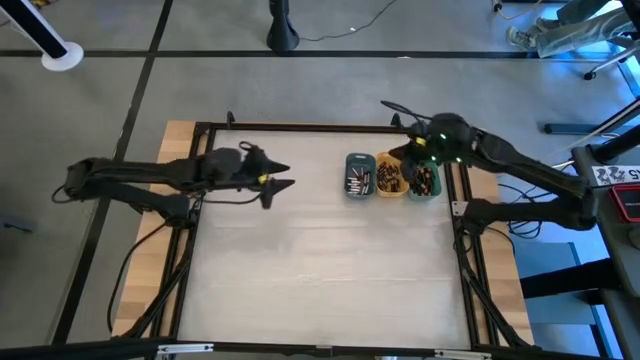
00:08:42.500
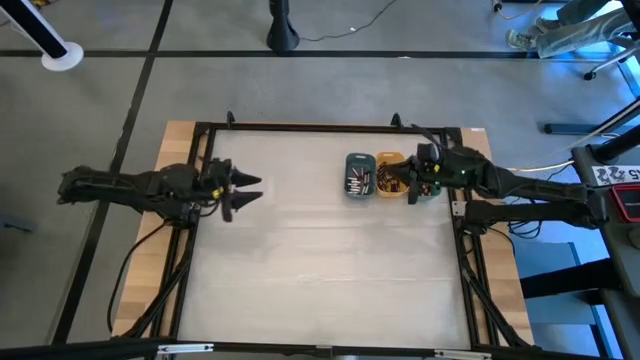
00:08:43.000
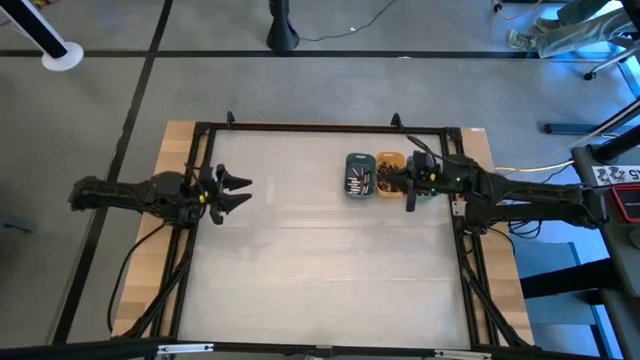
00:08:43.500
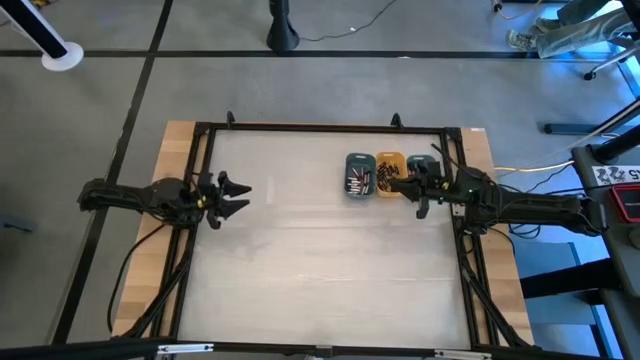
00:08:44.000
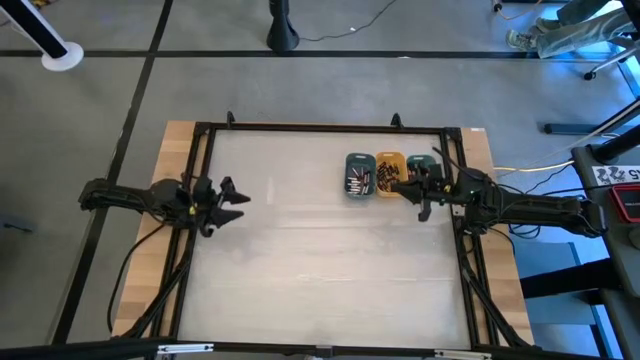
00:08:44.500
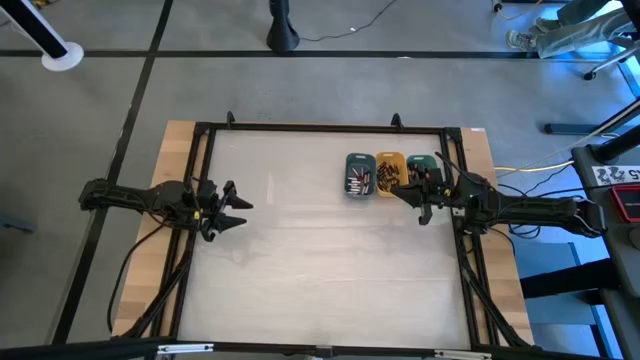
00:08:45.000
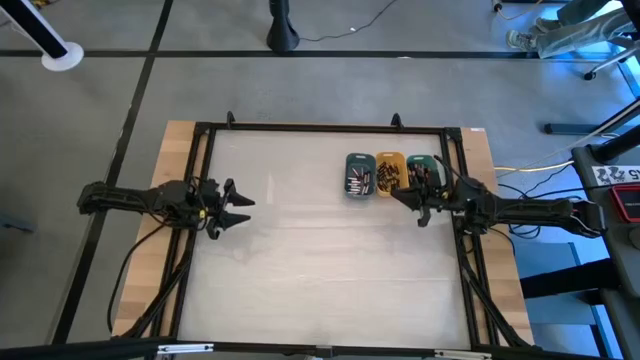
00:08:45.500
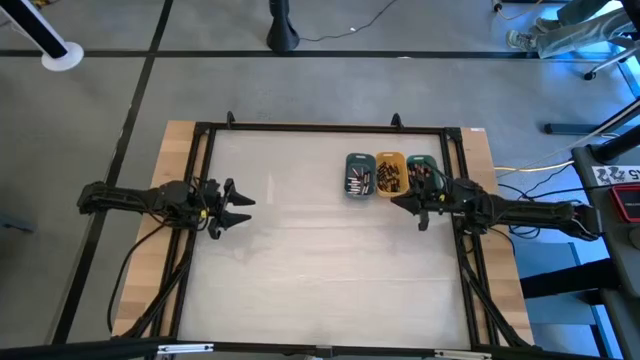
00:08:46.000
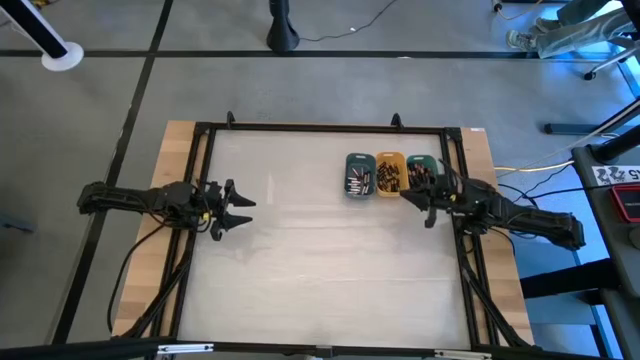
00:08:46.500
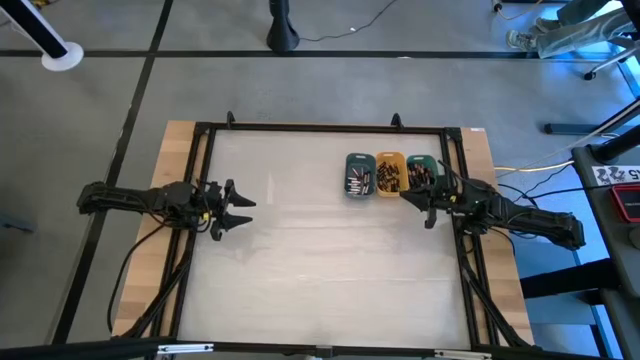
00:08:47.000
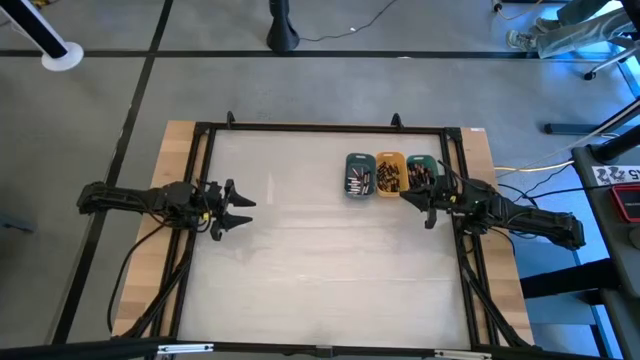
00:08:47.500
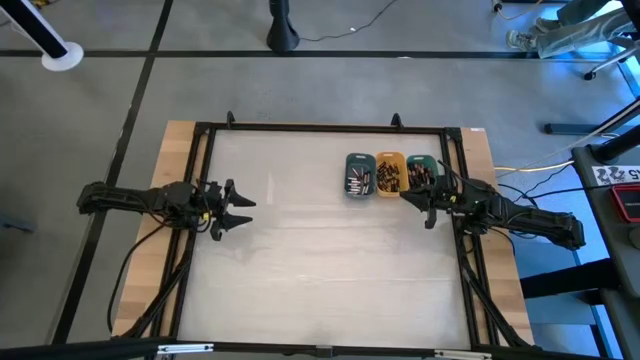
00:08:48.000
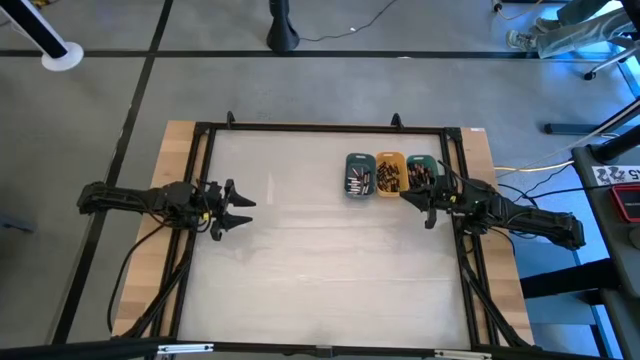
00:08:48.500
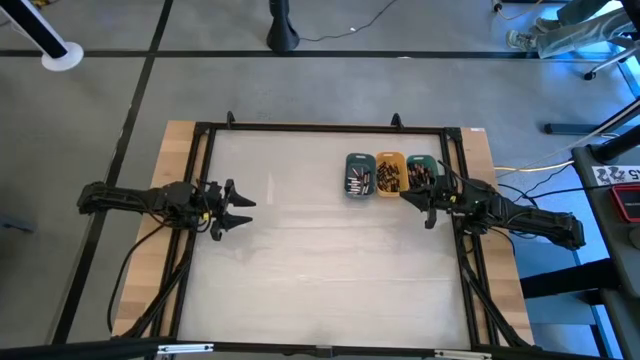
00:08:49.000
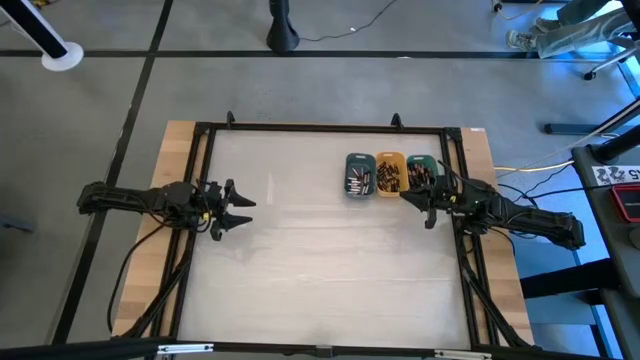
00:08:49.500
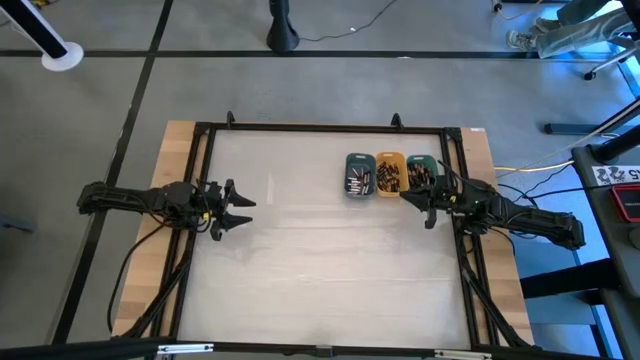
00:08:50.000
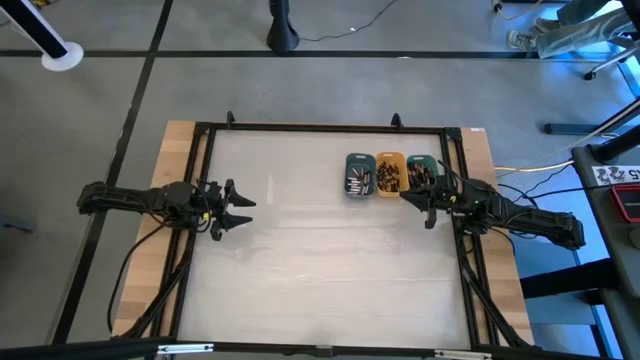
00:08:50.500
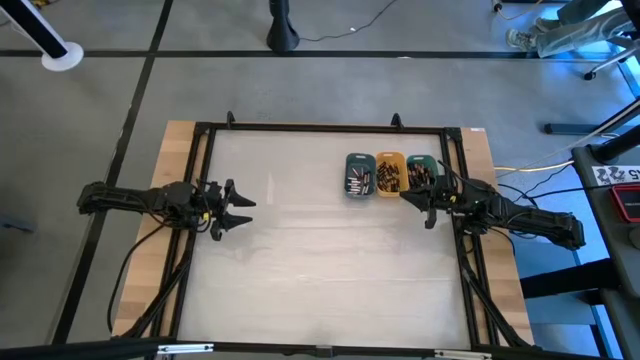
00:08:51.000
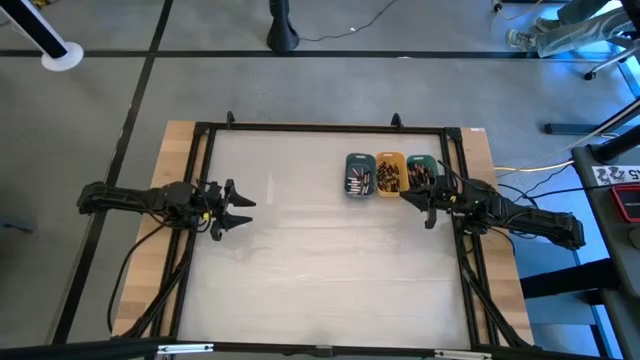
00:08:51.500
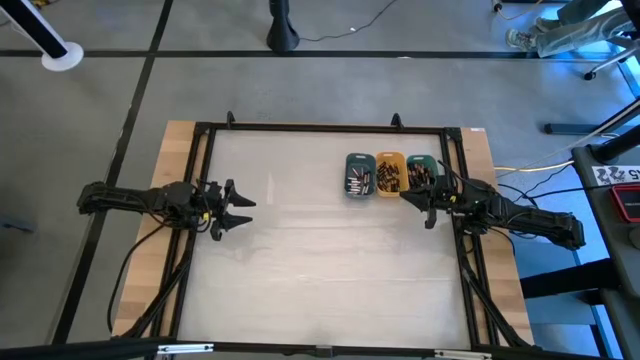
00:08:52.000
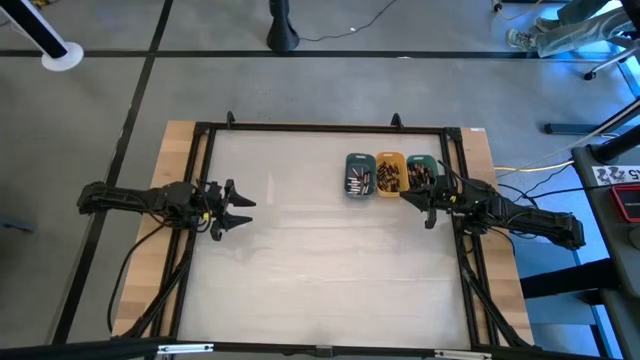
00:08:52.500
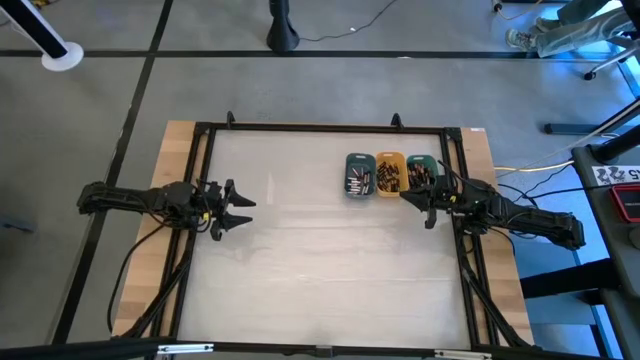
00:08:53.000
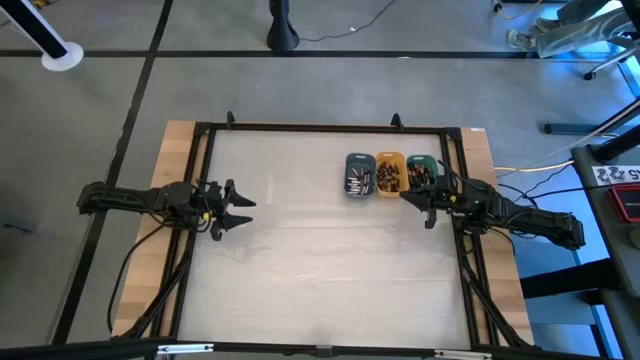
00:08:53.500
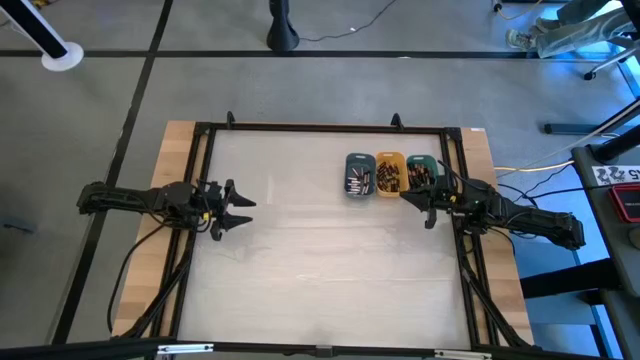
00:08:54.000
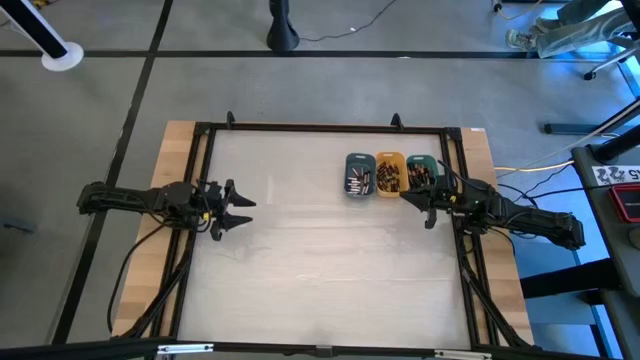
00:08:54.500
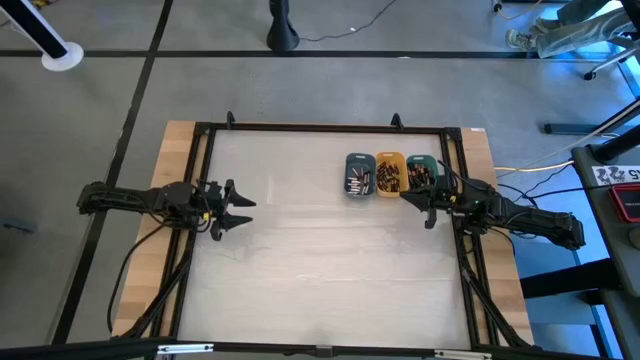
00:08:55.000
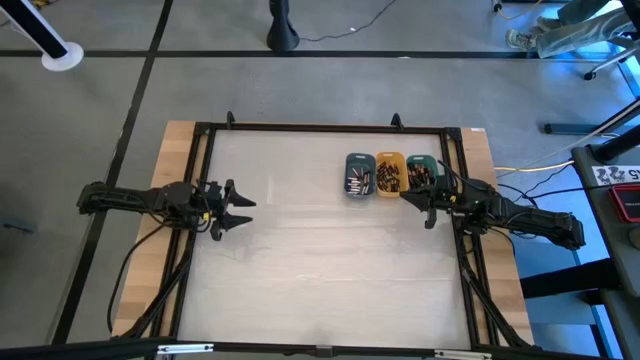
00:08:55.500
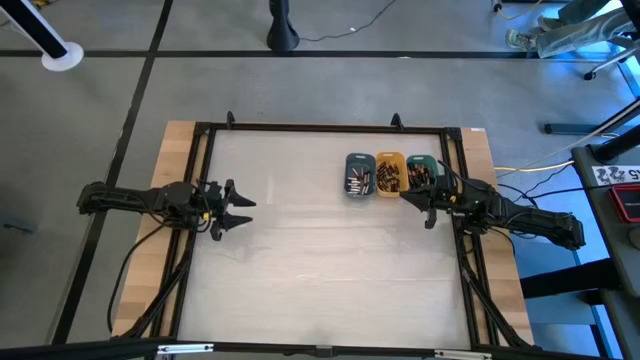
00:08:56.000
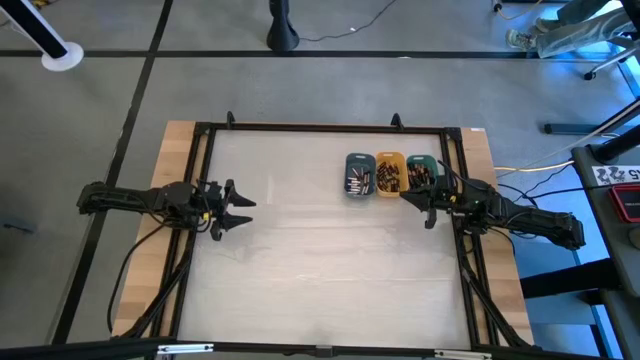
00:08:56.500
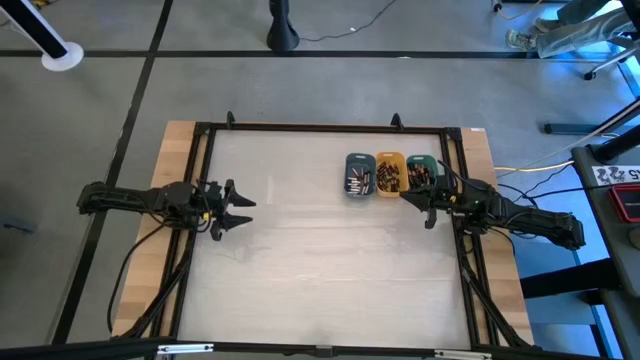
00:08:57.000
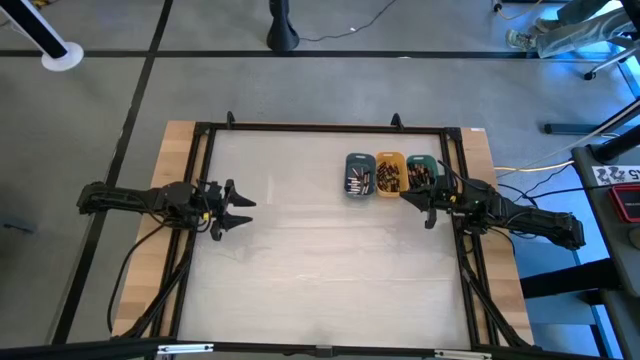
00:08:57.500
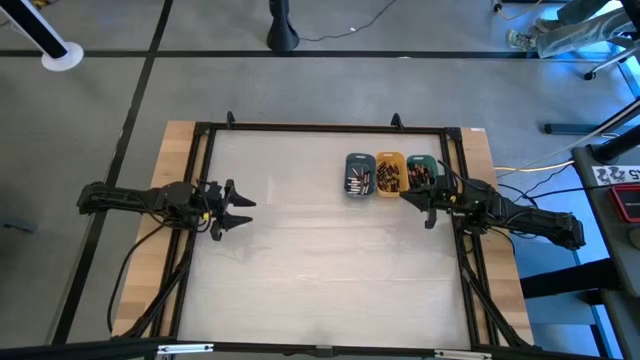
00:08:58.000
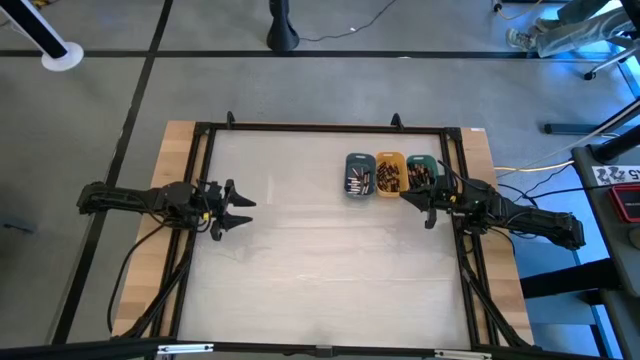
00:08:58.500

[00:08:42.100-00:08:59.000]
Task: Sort batteries
Return to Home Position

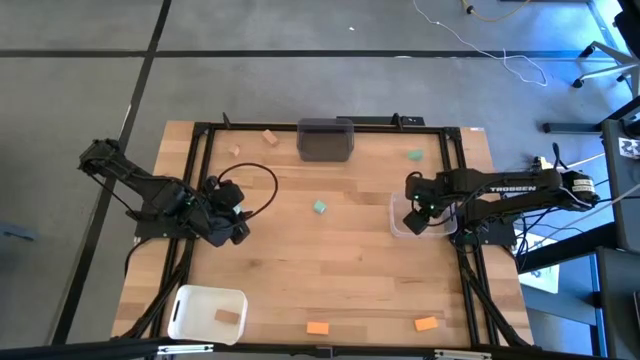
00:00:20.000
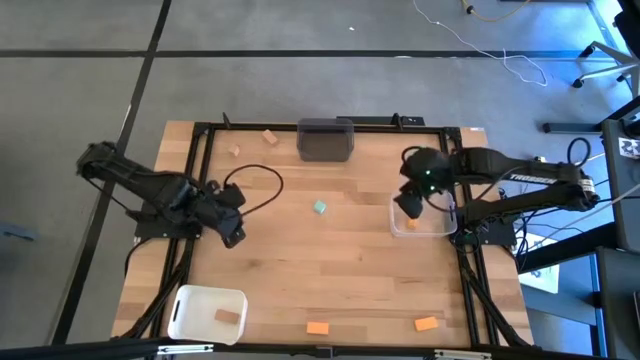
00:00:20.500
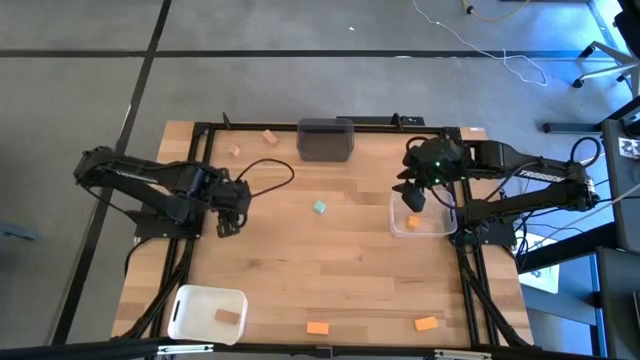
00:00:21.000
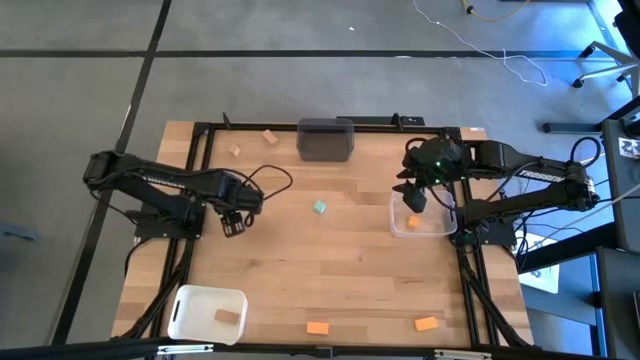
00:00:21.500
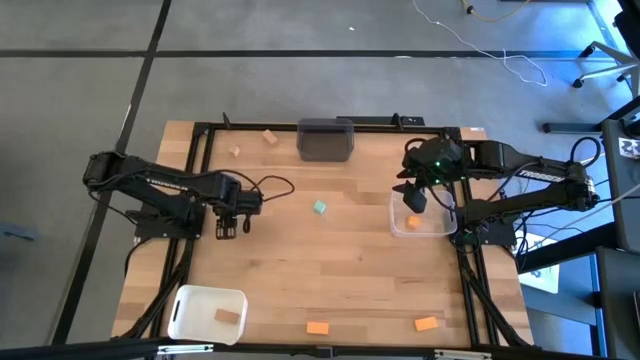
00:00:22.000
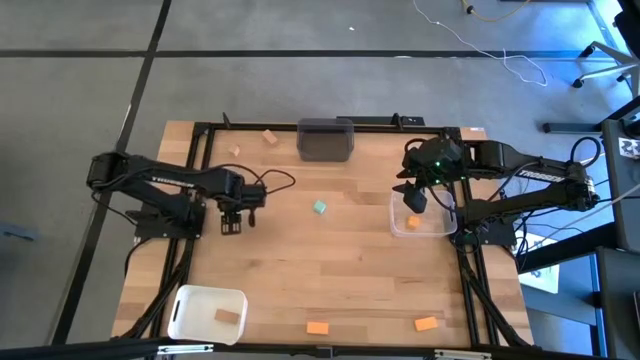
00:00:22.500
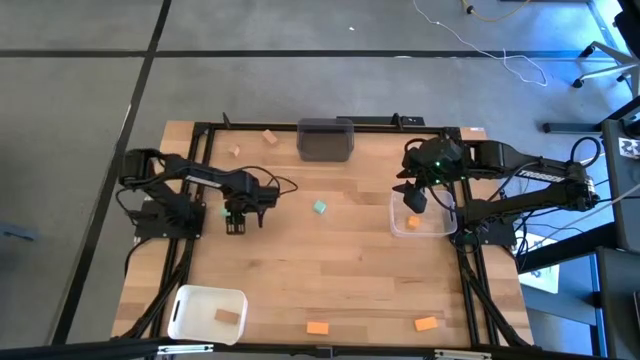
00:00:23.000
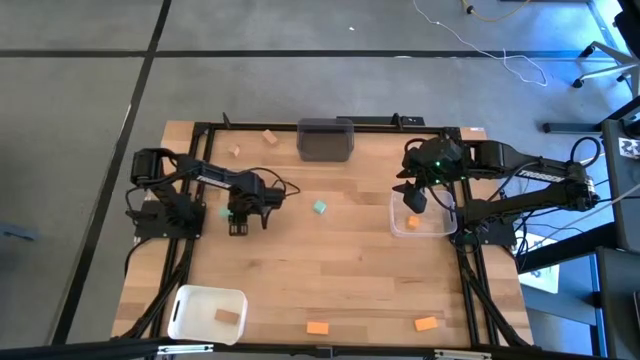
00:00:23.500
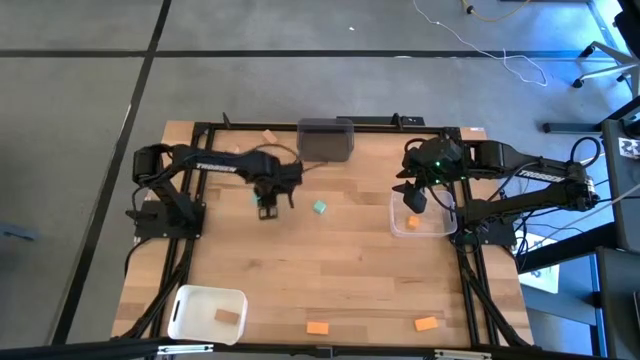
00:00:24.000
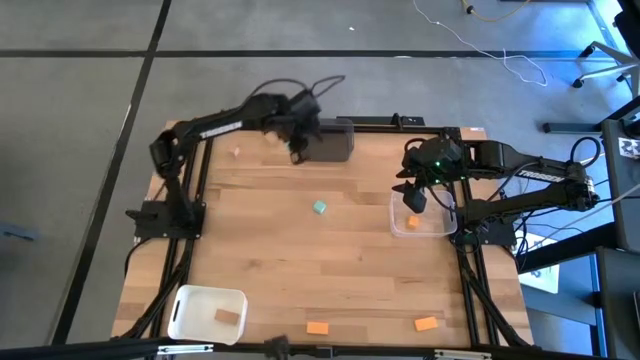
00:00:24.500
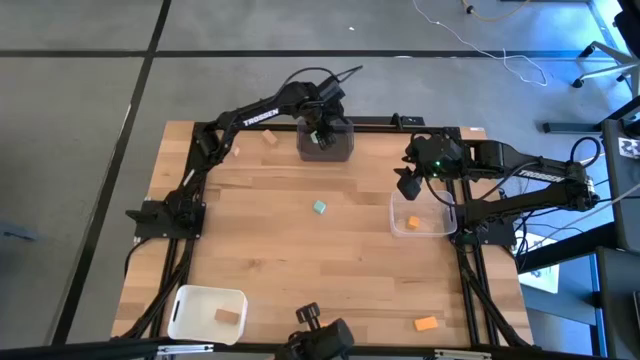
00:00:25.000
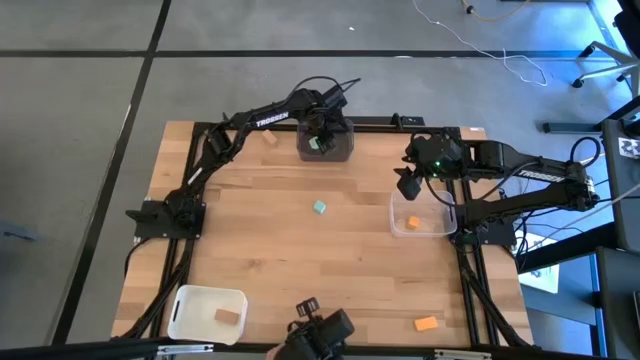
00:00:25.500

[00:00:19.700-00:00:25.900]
Task: Sort & place blocks by color
Put the bottom left blue block into the black bin
